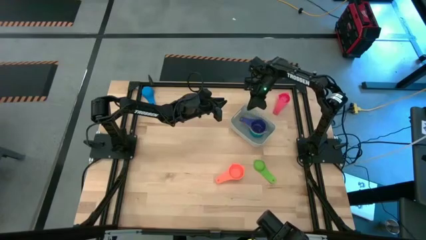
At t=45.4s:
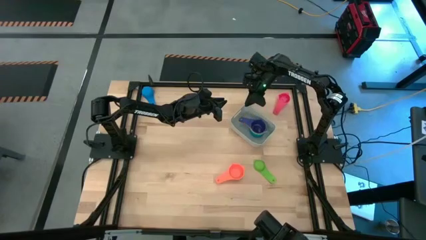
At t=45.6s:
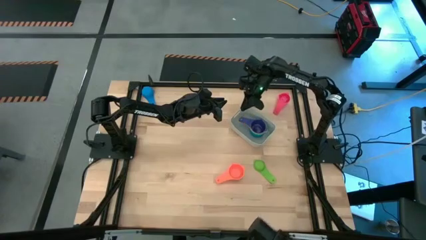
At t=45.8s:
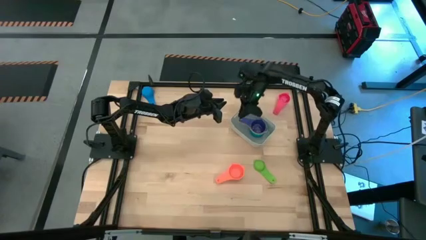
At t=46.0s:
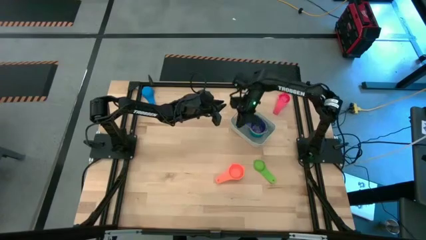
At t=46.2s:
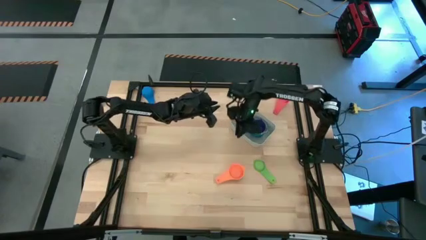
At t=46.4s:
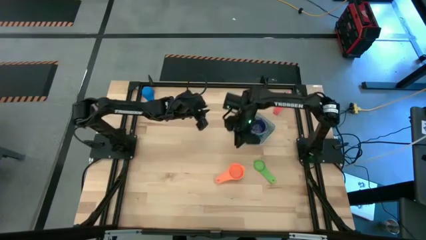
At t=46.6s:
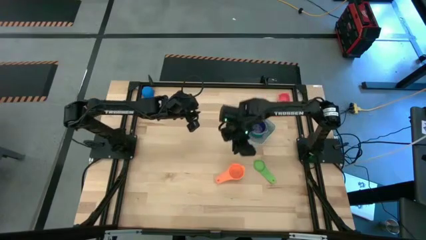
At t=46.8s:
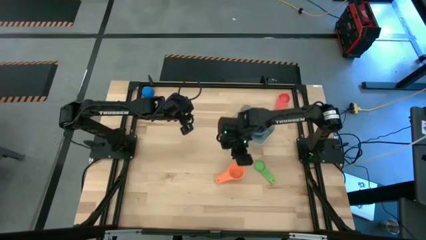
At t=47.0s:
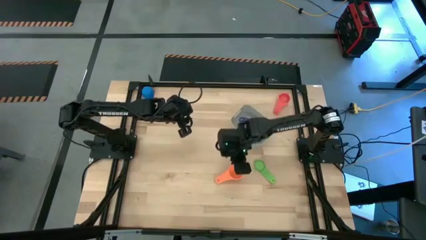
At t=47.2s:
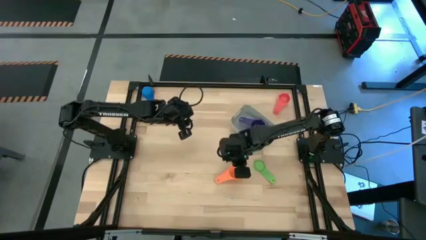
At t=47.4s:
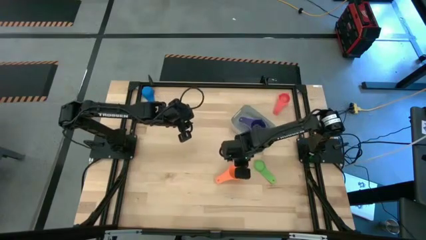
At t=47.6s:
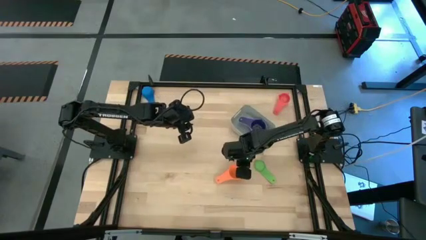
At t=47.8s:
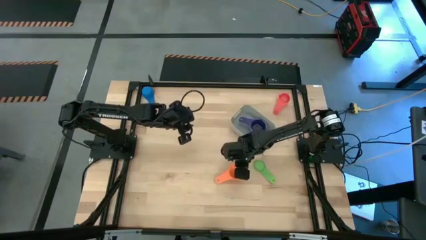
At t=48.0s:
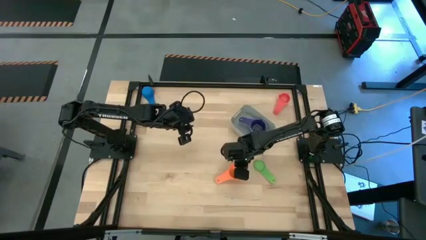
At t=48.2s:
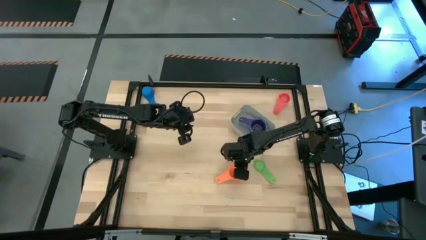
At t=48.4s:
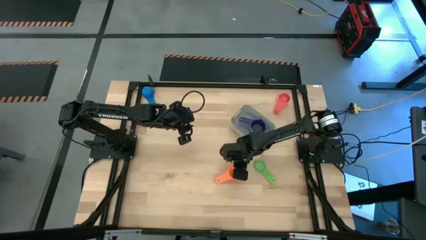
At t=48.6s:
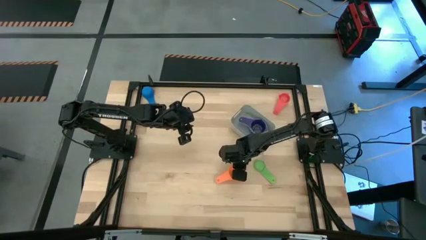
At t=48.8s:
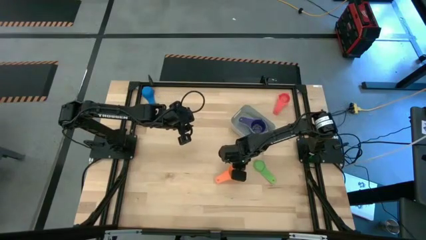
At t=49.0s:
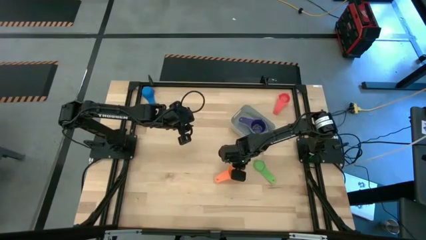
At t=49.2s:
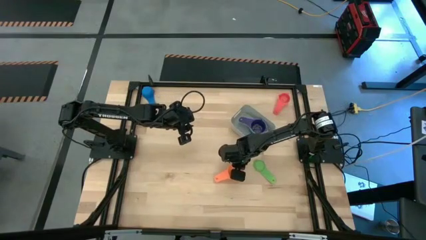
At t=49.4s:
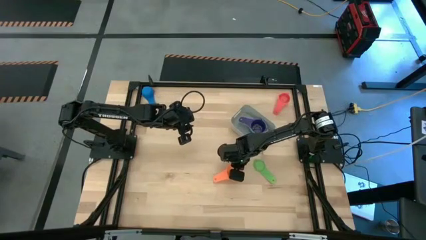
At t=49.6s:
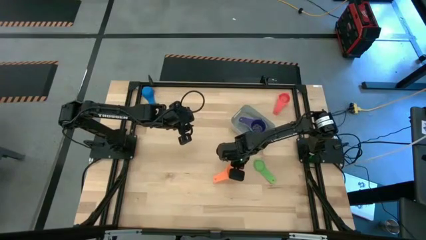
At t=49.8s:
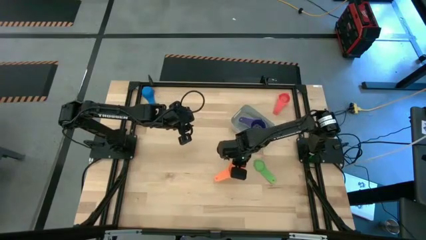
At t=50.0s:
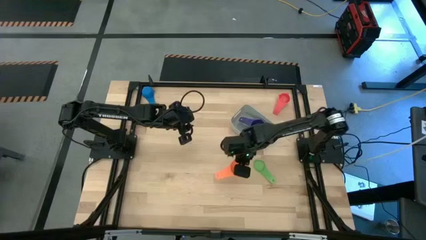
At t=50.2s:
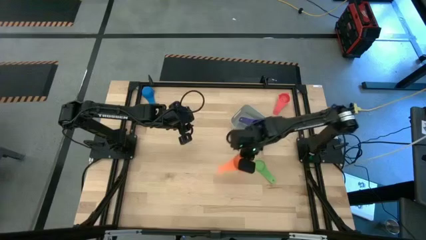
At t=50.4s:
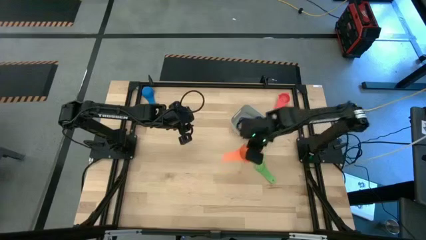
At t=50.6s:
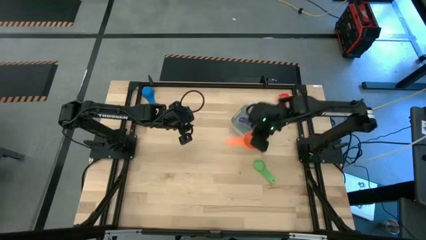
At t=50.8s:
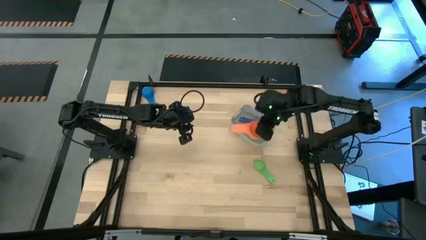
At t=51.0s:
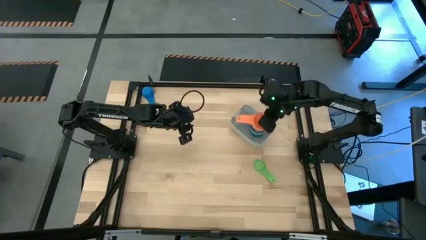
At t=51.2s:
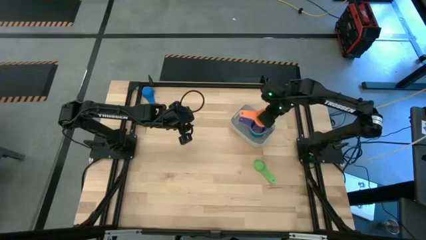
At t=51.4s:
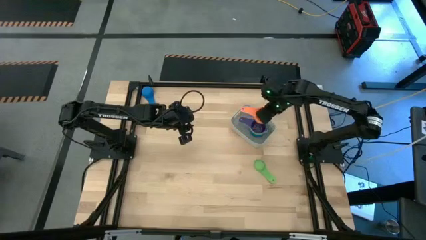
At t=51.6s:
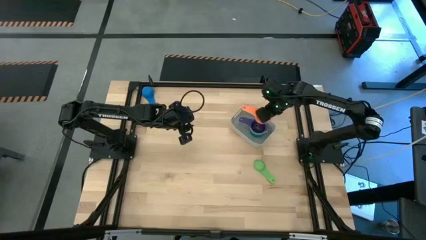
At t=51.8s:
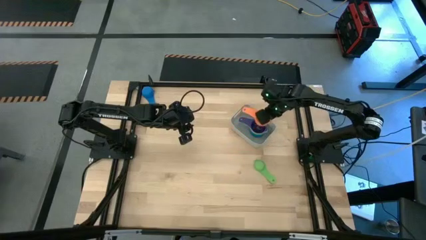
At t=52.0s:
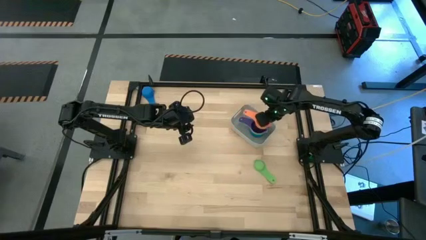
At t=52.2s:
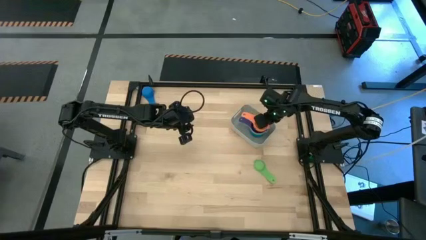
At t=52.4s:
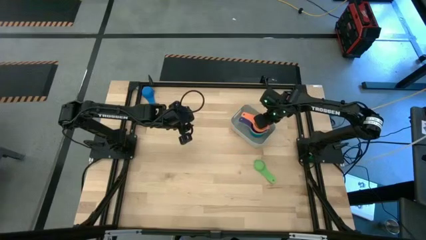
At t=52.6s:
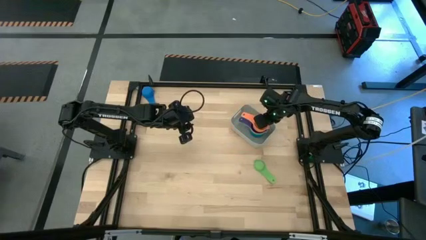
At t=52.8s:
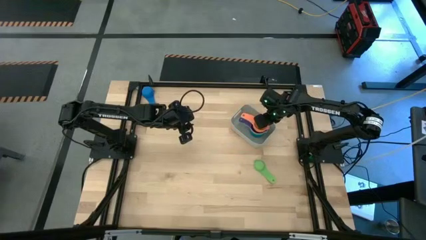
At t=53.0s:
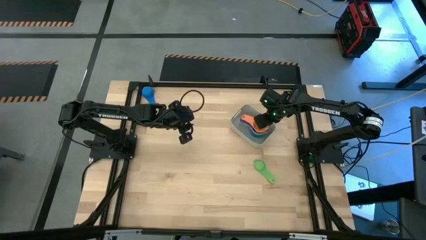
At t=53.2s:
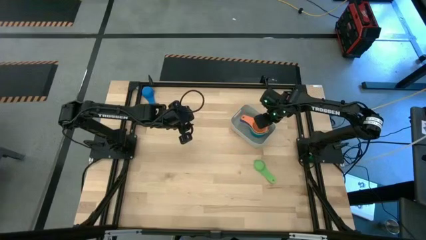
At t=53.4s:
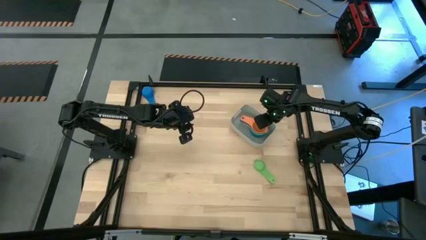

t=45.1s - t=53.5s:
Task: Nest measuring cups in basket
Stack the orange measuring cup on top of the dark blue measuring cup in the bin

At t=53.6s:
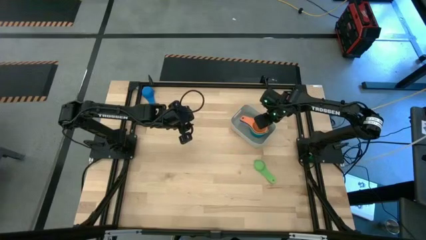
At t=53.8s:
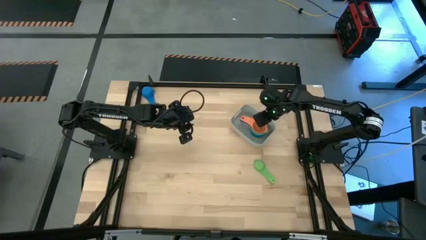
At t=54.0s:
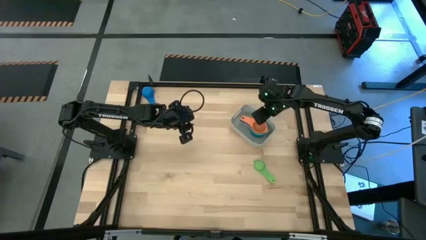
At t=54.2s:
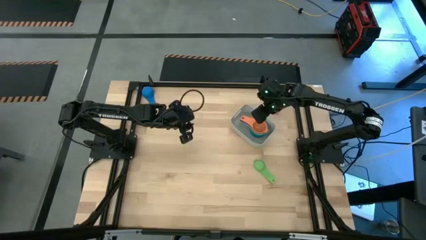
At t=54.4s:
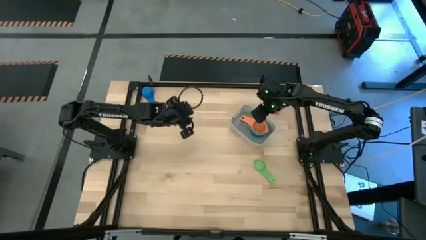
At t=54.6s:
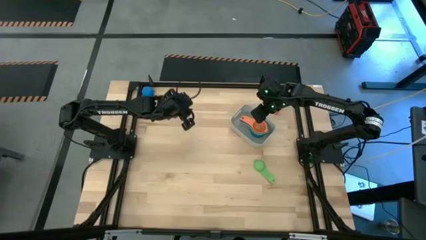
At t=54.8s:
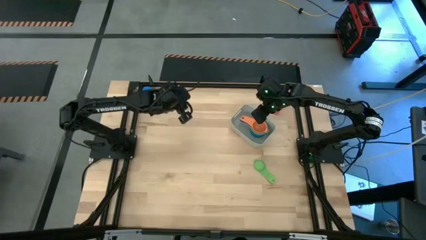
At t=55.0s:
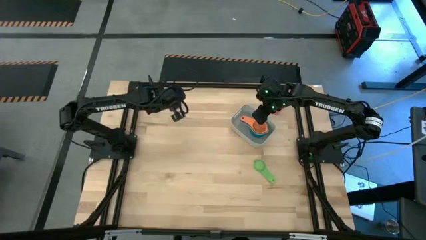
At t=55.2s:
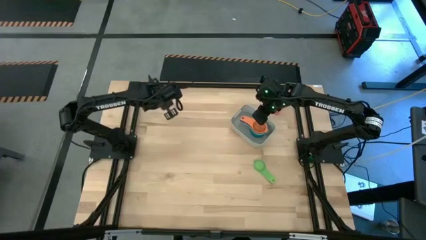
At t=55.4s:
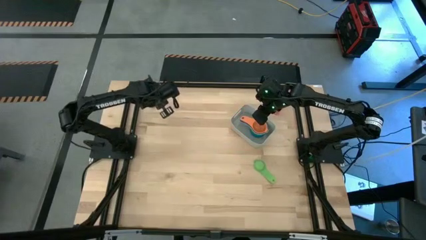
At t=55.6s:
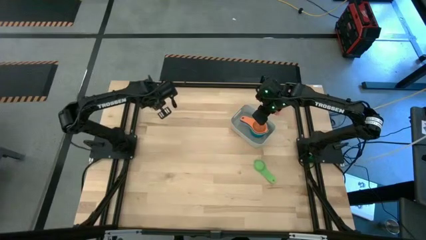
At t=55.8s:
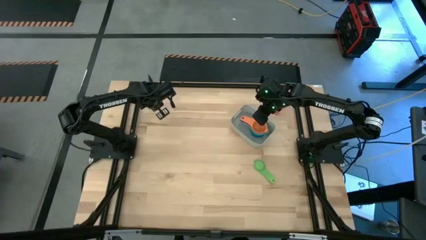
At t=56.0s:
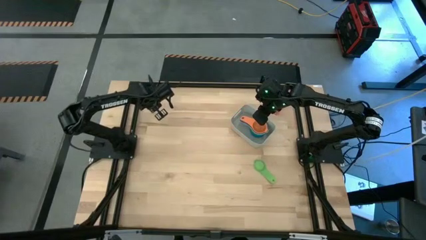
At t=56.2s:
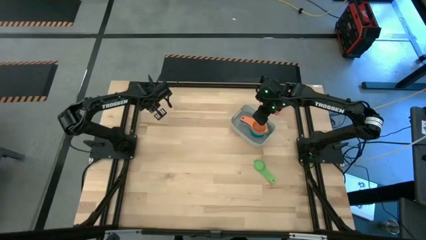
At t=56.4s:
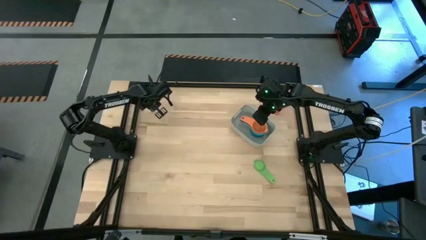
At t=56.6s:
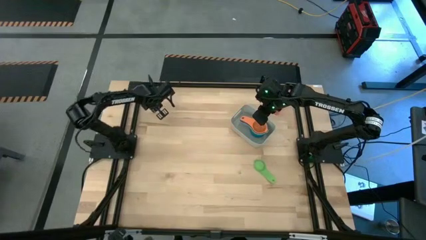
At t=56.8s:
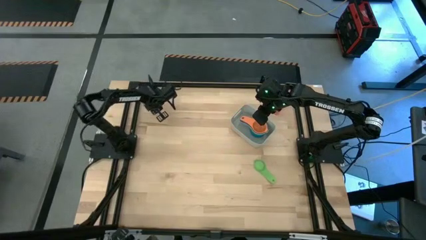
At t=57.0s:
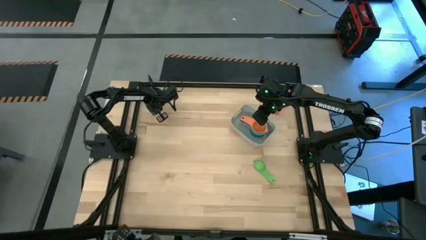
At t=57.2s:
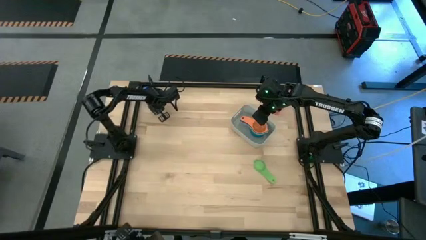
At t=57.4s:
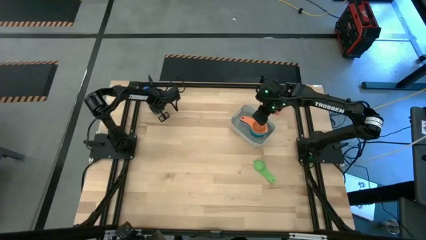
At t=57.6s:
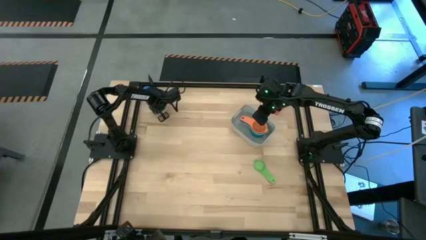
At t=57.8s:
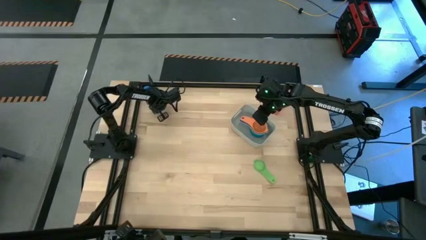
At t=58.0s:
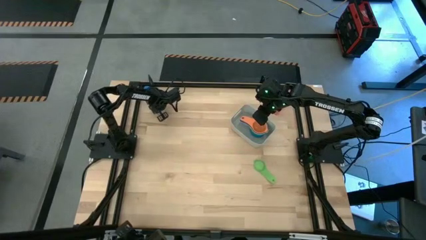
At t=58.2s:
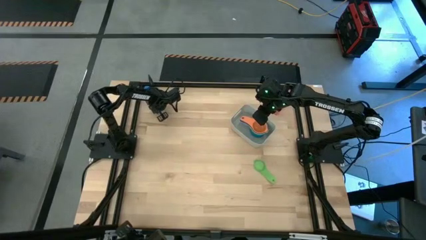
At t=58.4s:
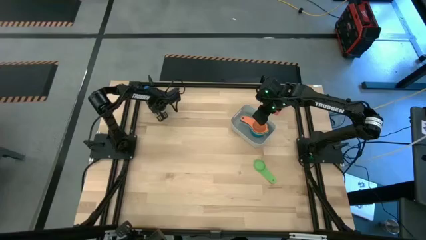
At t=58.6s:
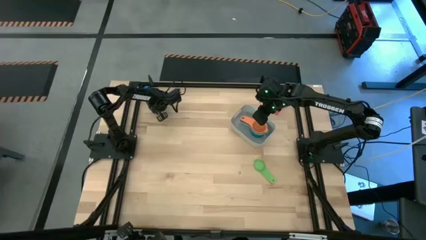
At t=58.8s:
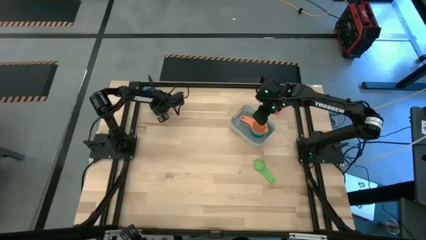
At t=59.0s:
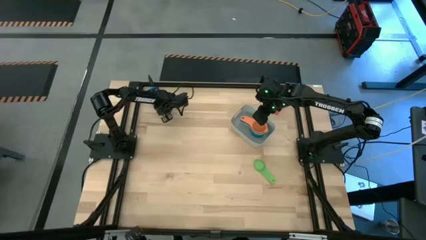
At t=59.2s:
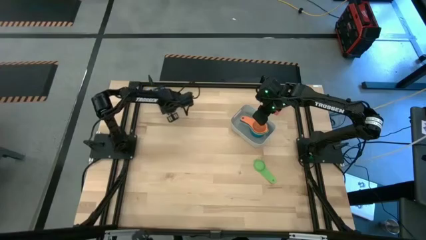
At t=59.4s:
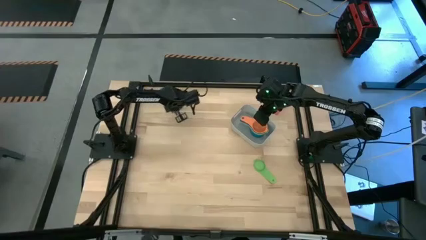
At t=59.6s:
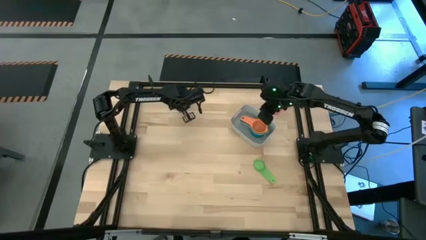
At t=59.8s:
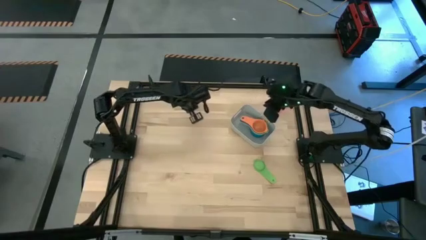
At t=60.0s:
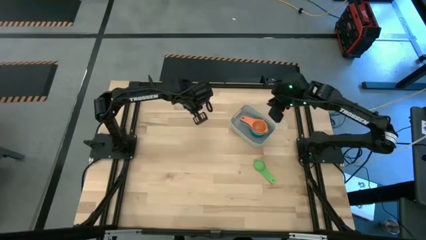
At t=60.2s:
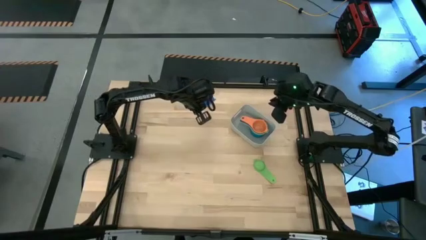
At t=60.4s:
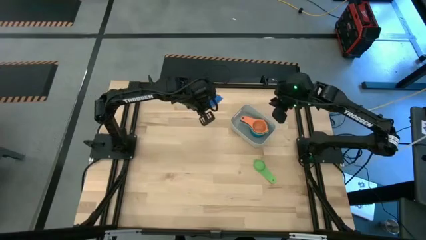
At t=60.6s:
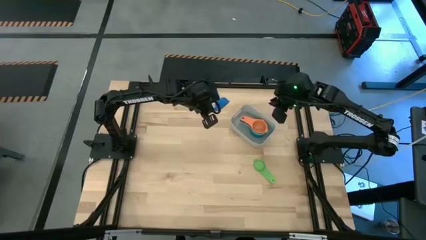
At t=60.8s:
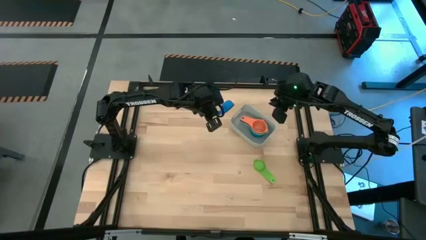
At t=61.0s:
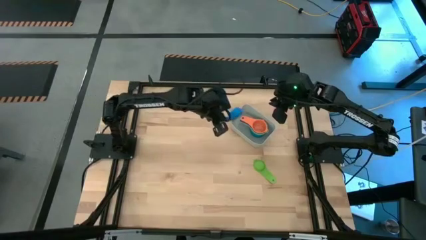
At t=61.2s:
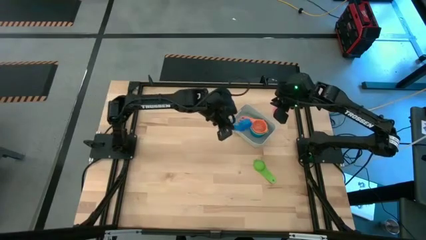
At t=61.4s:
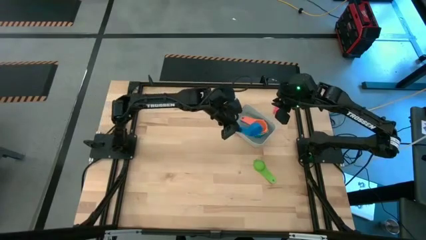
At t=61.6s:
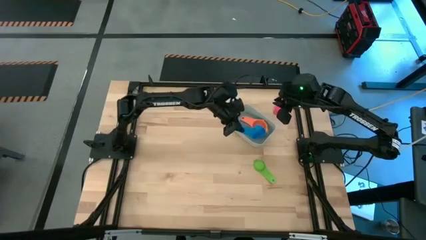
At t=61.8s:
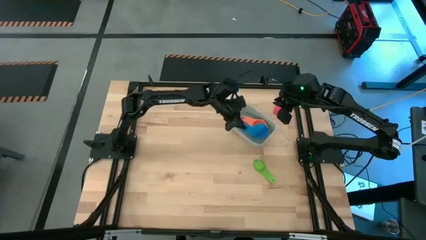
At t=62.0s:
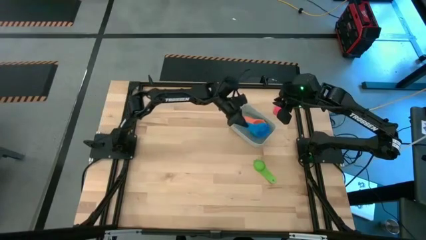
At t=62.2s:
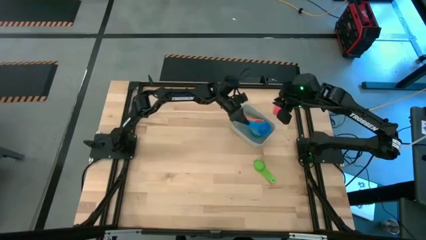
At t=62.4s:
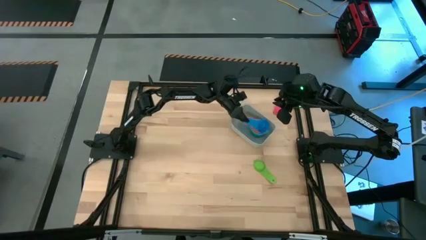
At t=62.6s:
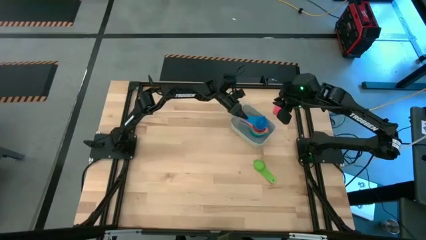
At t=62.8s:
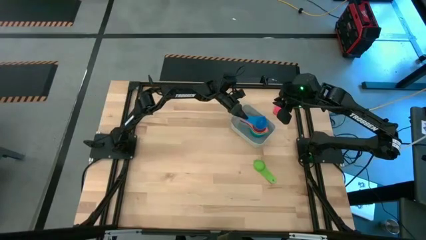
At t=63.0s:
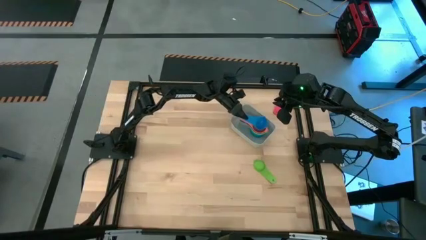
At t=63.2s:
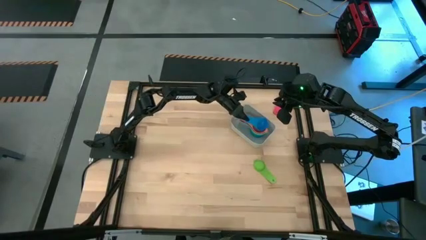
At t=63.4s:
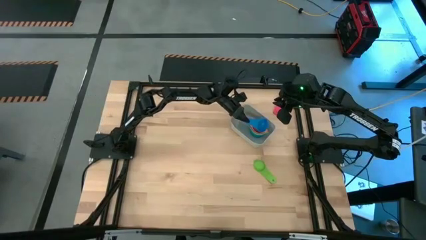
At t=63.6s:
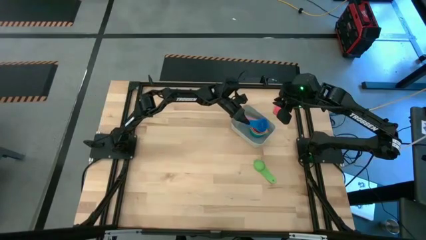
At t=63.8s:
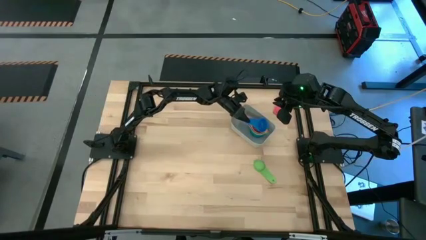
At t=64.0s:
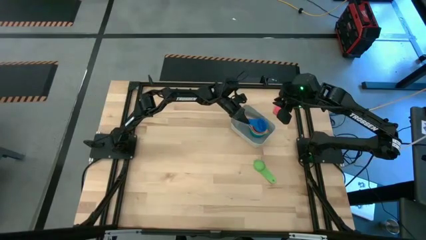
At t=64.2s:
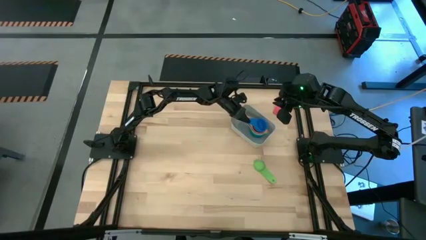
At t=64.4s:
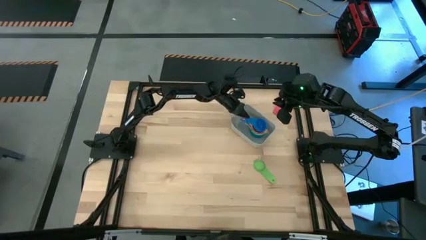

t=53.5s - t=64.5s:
Stack the blue measuring cup on top of the orange measuring cup in the bin
